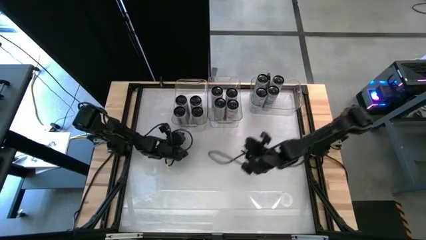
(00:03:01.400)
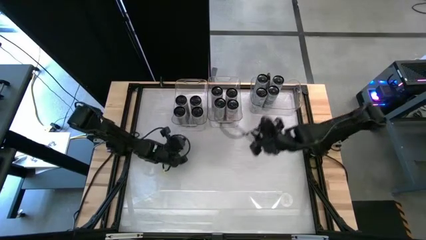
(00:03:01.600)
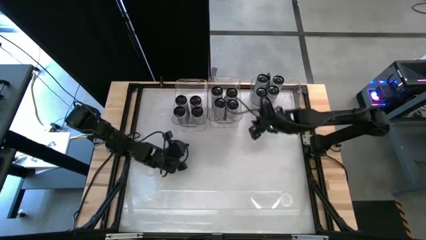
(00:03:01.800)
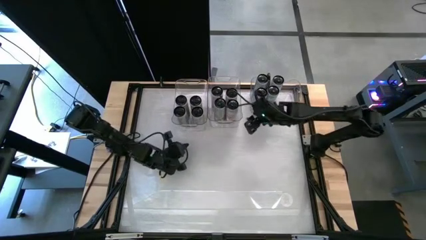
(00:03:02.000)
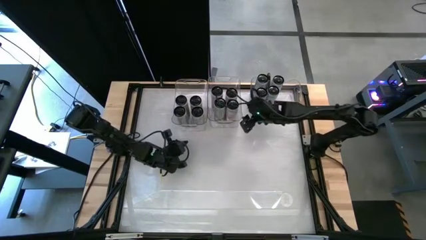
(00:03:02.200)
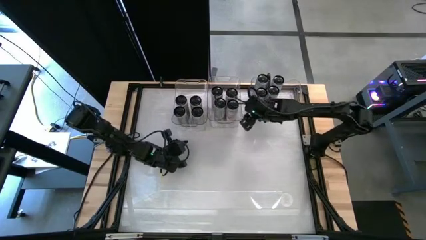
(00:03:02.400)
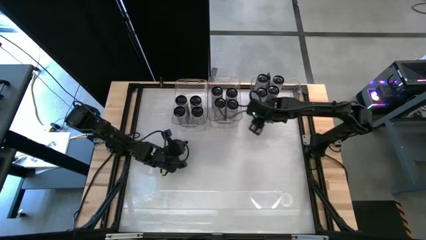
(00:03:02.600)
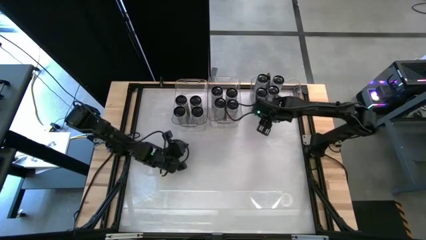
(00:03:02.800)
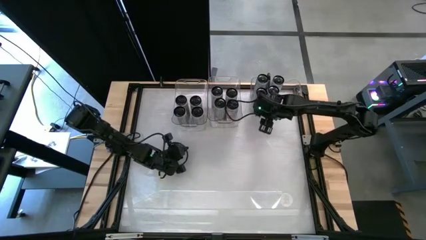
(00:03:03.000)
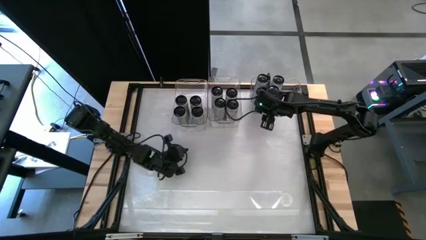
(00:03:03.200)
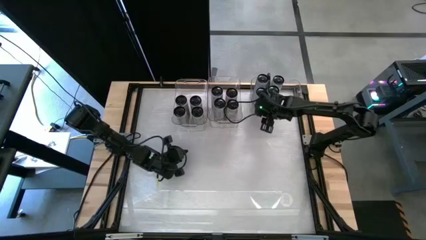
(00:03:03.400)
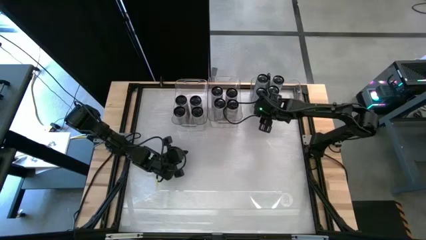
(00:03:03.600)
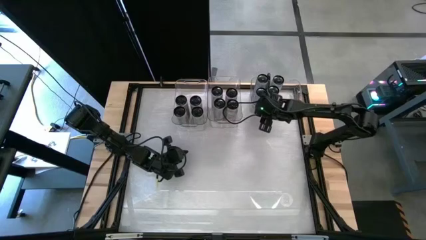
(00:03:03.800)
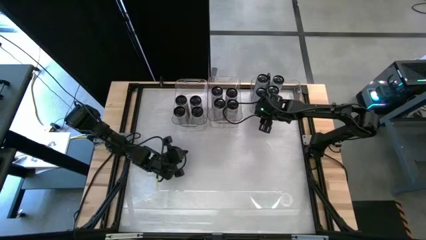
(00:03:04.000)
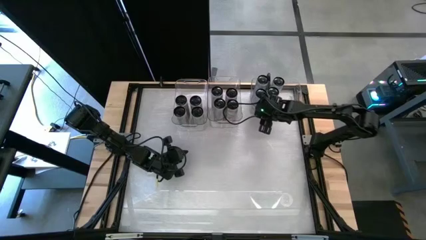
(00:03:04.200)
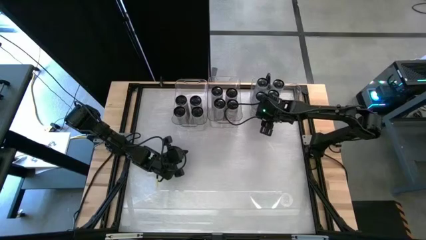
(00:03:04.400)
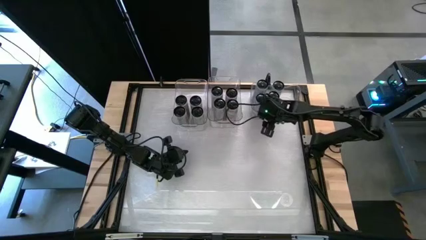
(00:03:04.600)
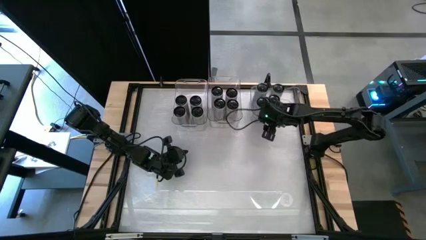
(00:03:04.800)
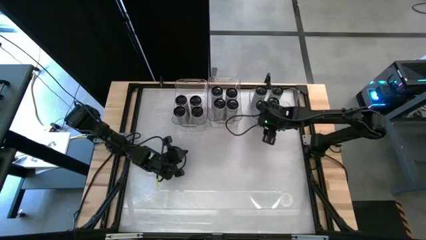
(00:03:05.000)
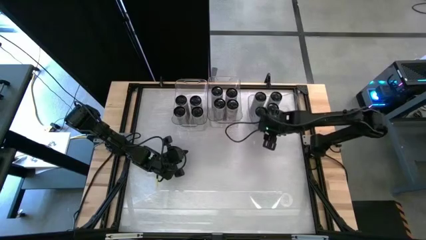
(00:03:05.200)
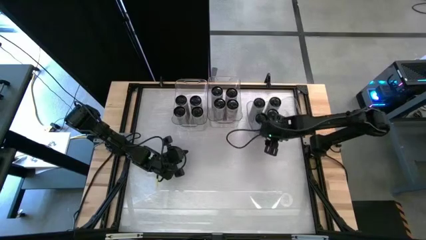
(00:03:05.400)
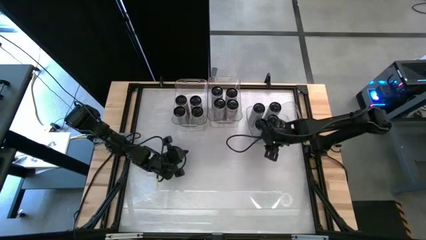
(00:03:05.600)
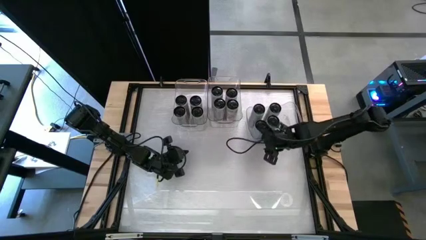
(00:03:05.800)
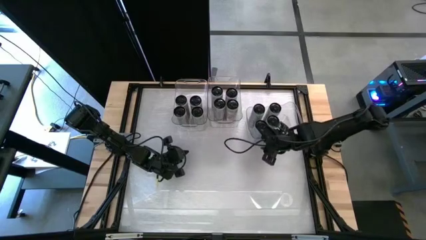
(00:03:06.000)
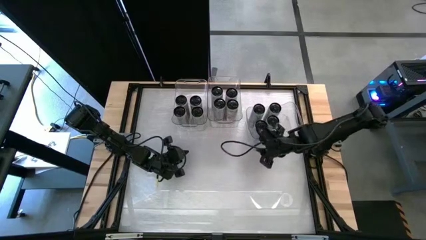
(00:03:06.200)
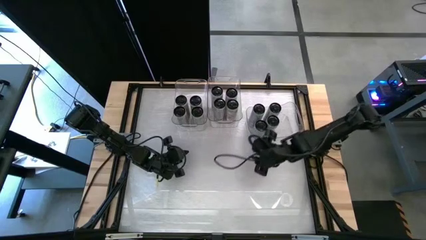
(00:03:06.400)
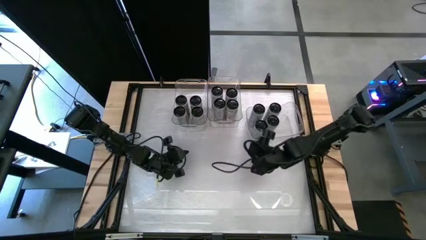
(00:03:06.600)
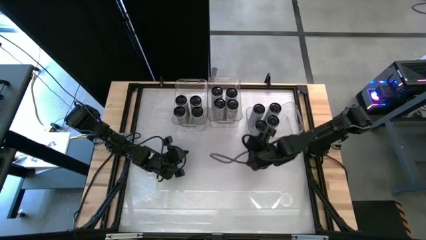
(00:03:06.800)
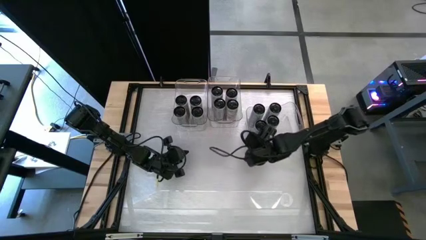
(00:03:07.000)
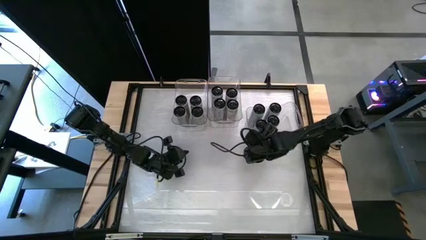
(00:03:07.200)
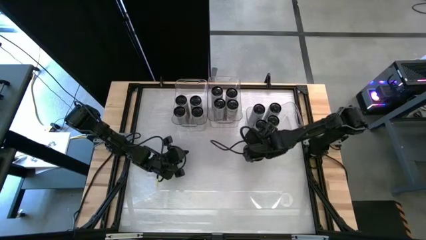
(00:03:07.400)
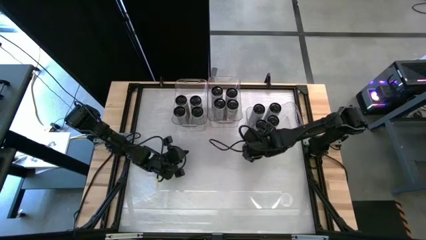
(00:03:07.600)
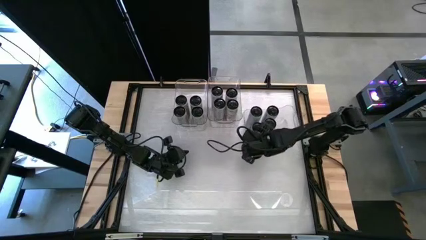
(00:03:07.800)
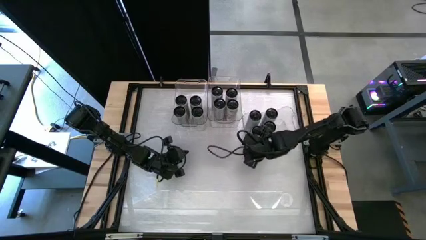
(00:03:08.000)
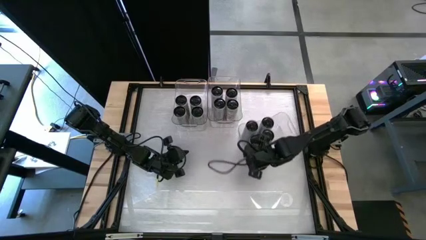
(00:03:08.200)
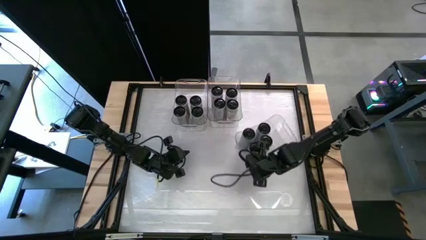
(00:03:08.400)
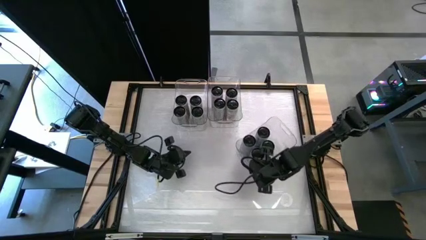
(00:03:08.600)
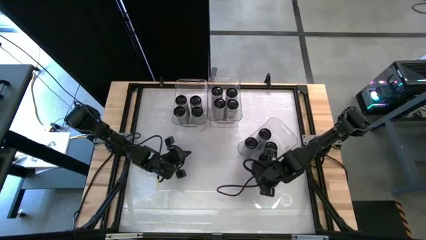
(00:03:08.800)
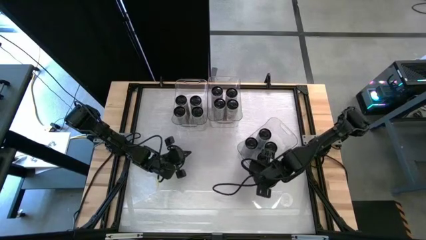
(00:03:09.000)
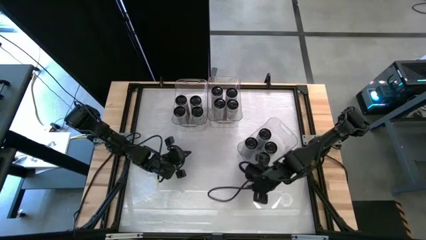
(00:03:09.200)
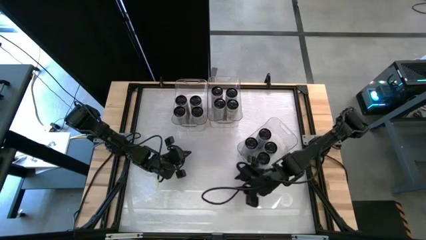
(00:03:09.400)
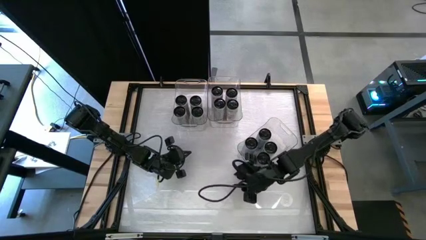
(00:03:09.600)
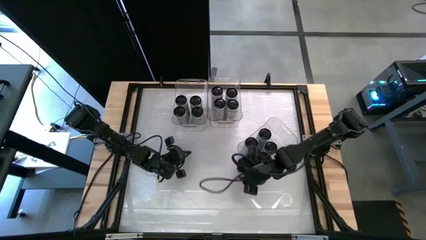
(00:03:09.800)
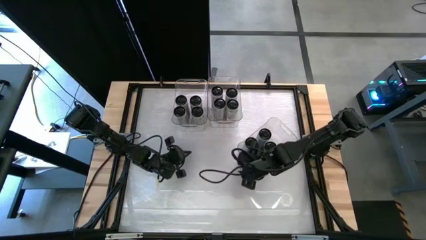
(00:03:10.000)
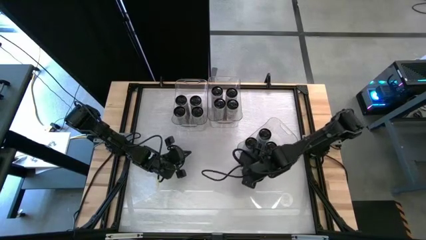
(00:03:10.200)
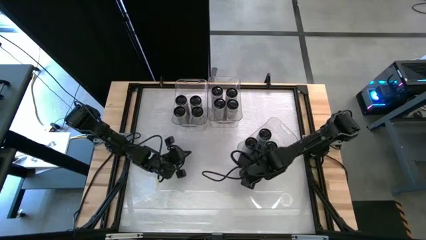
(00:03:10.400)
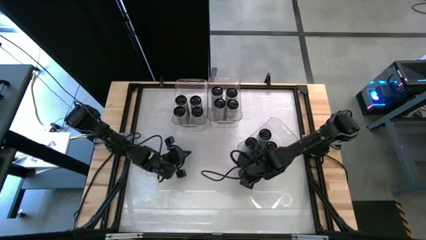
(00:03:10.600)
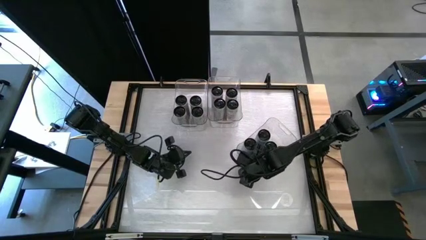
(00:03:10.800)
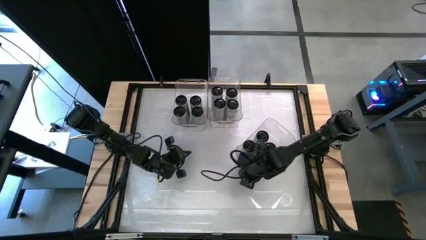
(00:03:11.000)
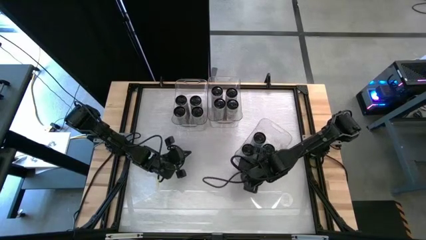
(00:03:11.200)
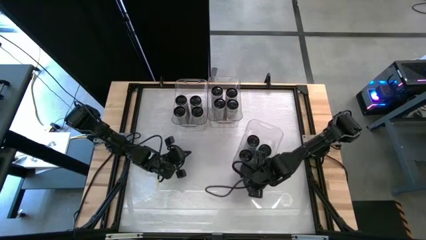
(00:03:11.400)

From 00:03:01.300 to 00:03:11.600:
Task: Sort soda cans
Adjust the right transparent bin

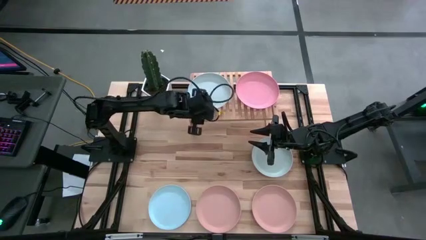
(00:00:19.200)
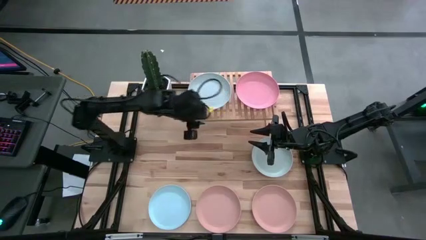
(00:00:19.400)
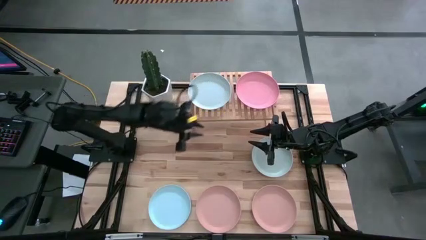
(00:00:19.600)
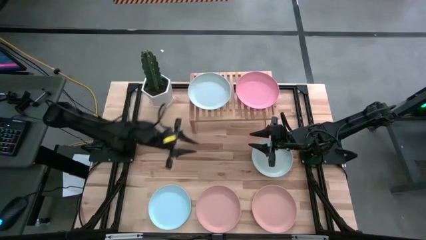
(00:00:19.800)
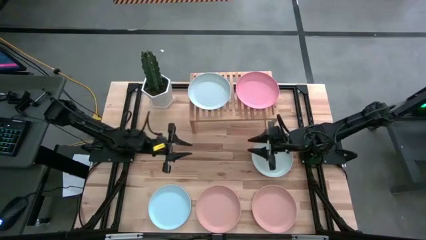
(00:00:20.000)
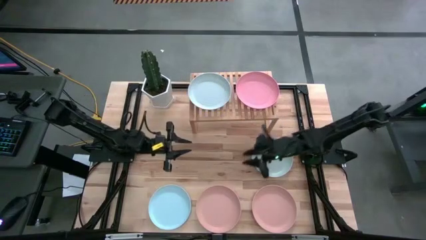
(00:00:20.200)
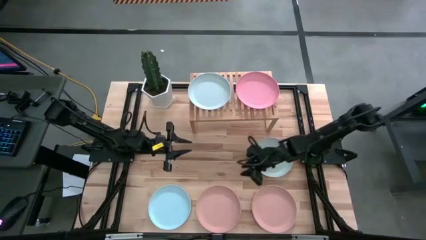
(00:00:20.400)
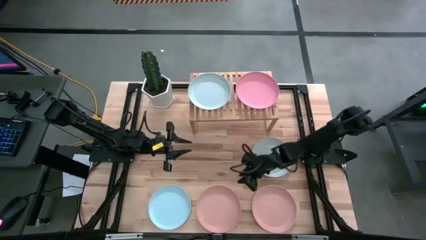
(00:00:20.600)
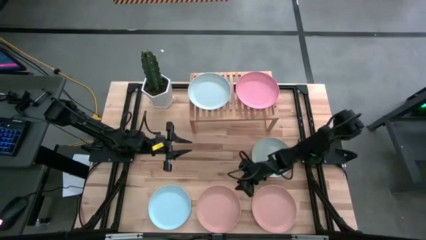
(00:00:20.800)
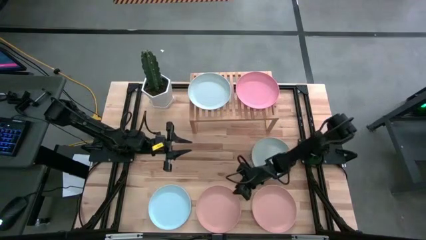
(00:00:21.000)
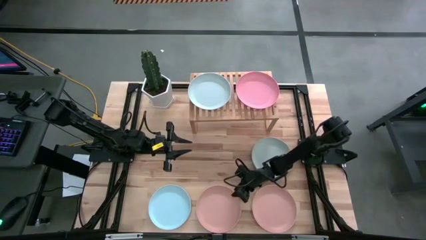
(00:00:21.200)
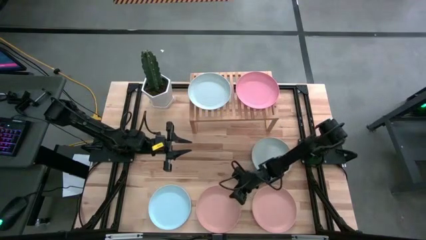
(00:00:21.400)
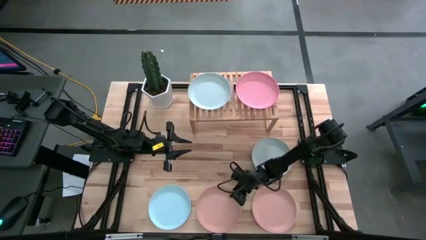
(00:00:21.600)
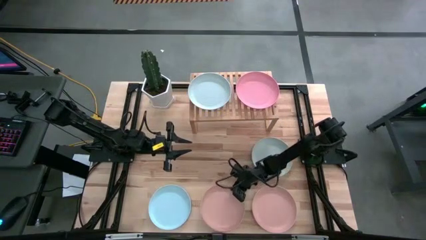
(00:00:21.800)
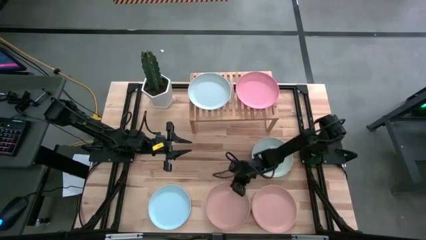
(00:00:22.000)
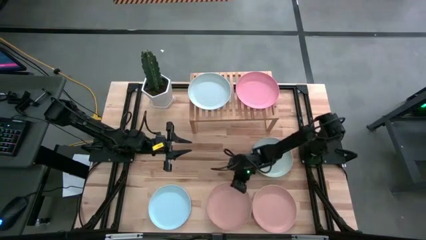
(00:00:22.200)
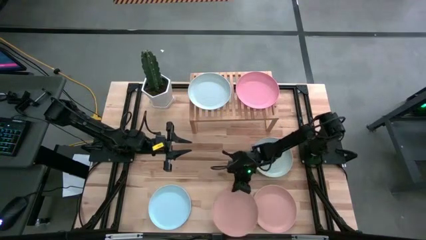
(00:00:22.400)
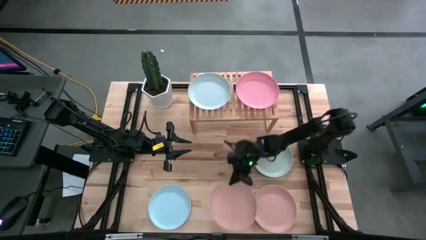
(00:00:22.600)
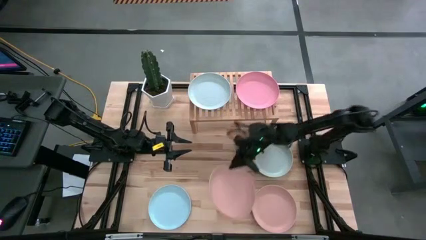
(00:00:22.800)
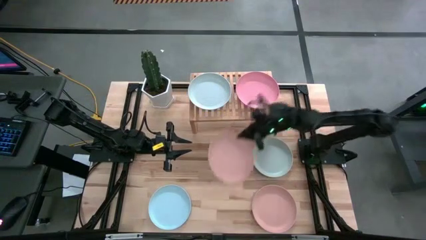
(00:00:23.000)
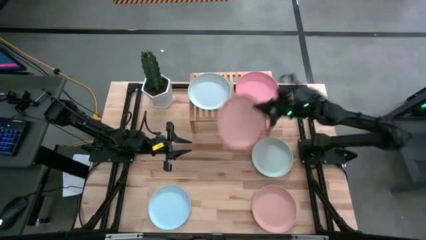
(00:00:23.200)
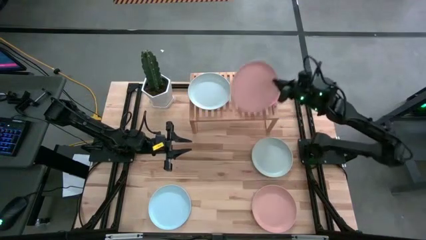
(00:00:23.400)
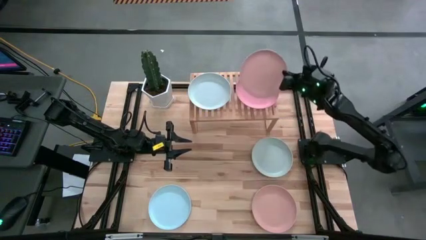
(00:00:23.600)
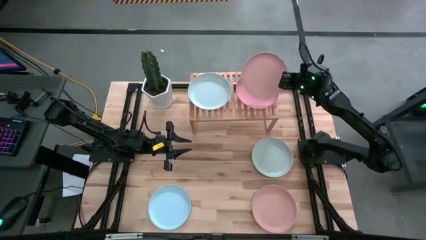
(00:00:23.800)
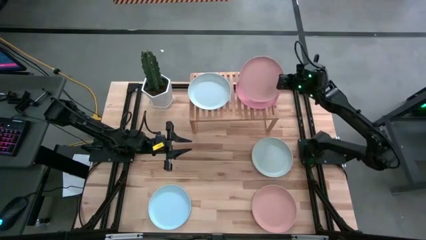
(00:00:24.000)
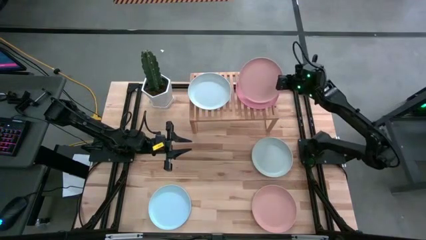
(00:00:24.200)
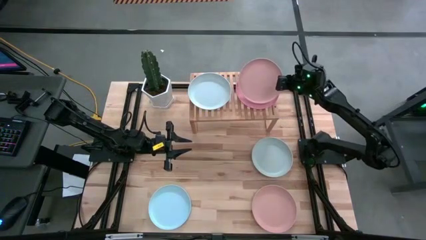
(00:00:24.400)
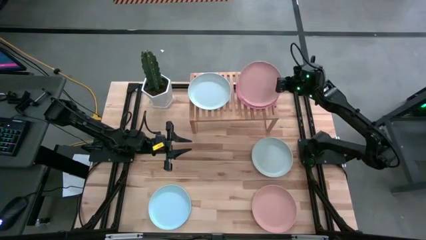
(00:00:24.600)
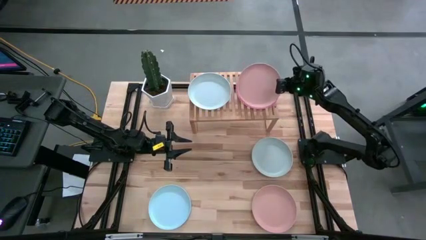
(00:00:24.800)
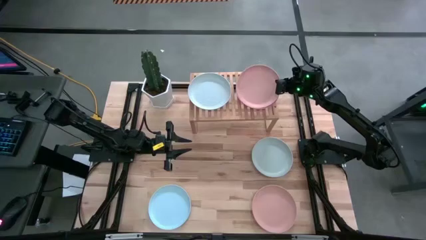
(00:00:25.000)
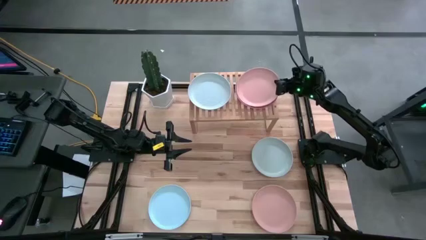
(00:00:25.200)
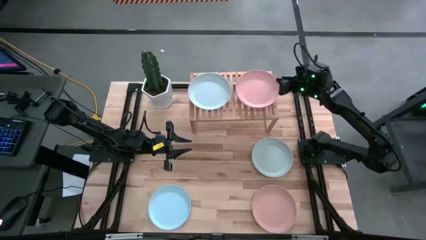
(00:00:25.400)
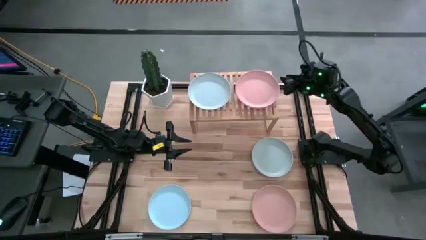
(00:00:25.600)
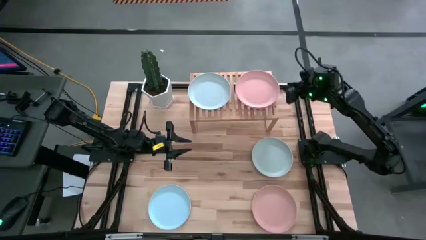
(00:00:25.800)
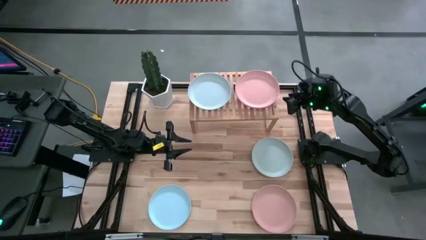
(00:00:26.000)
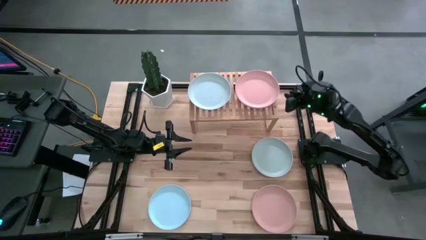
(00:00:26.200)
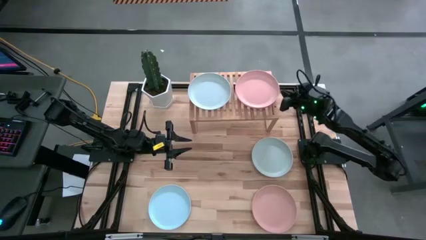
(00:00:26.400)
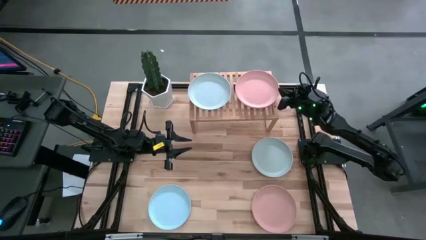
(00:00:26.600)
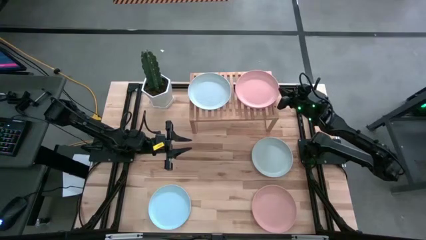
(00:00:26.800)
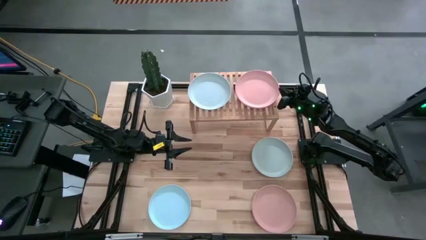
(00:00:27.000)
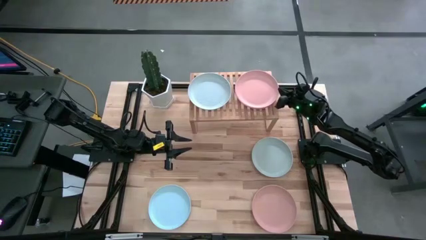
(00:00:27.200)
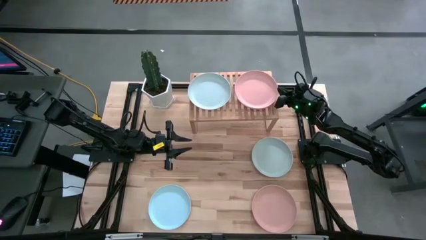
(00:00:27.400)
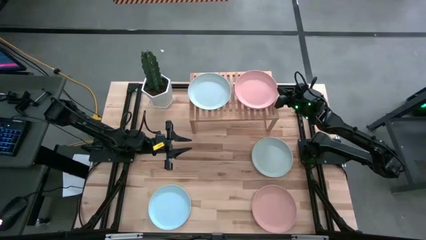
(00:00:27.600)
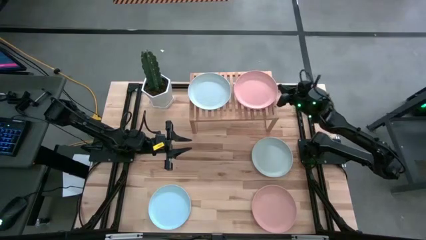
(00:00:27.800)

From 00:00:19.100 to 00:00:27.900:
Task: Place and stack plates onto a shelf
Stack the left light red plate on top of the pink plate on the shelf
